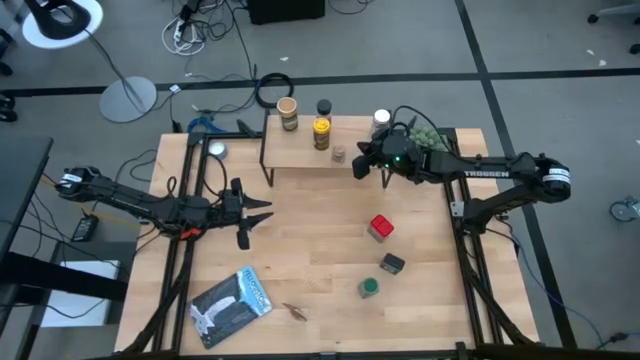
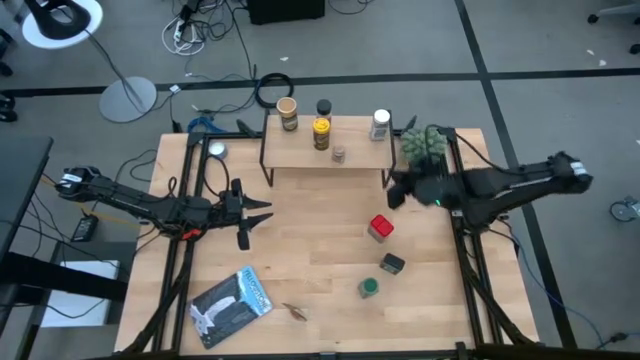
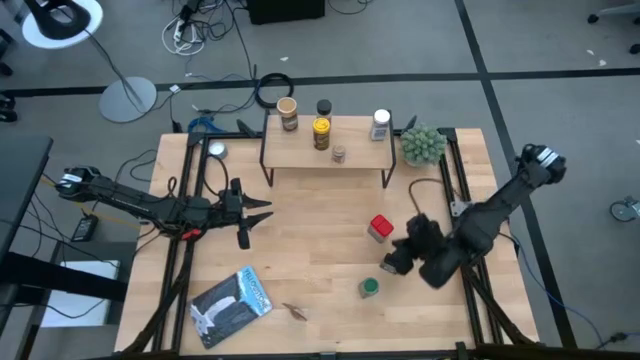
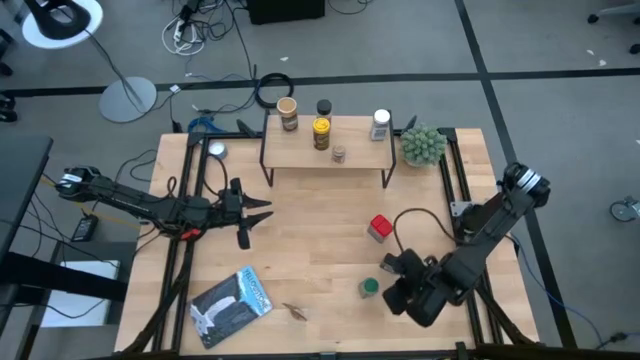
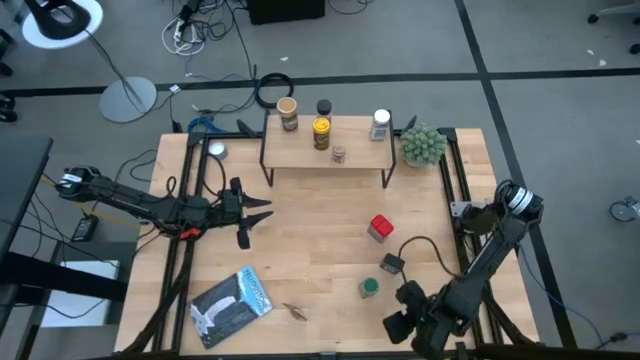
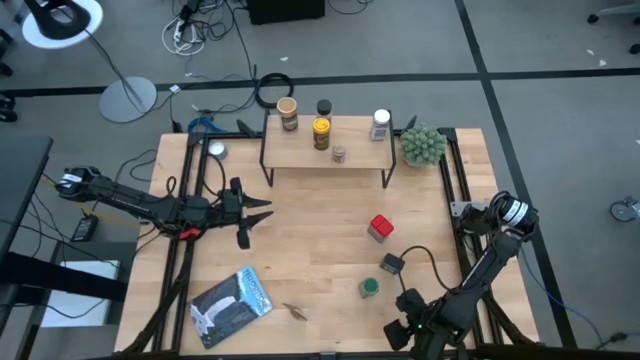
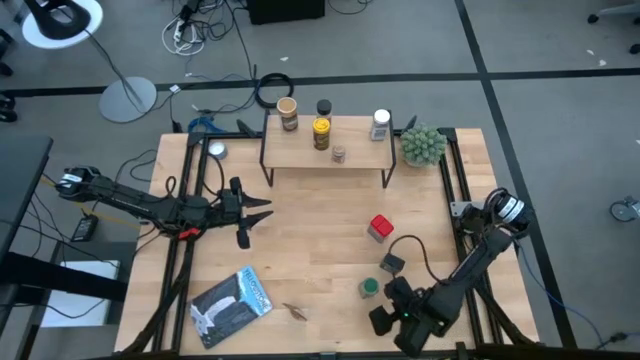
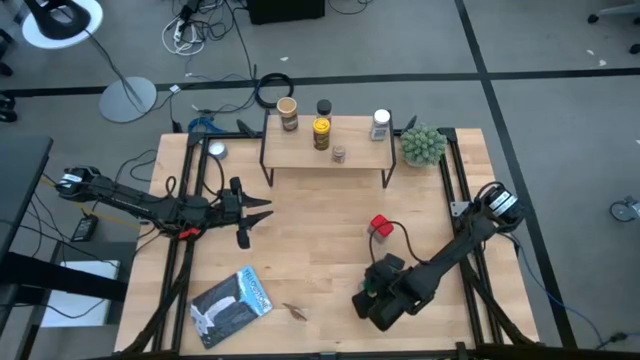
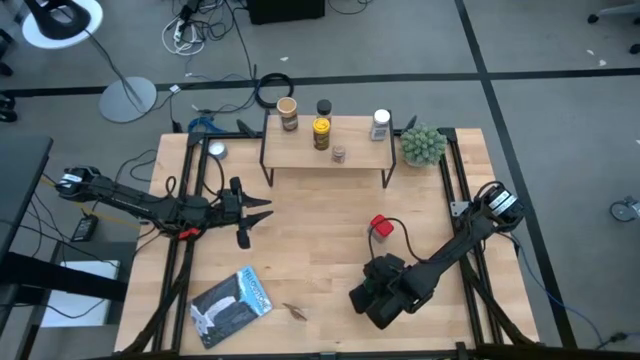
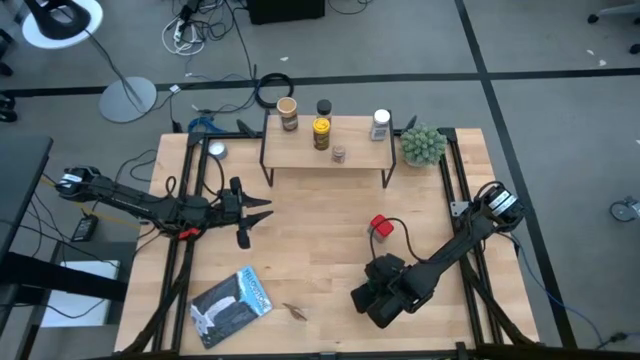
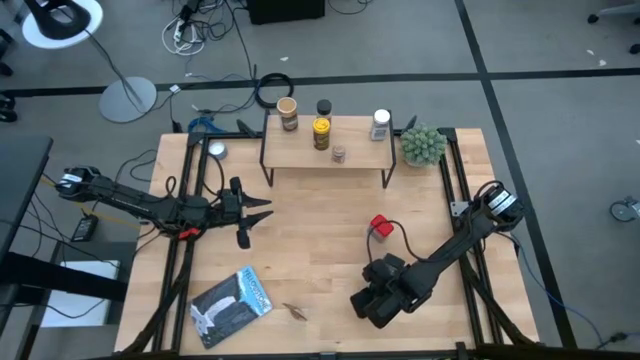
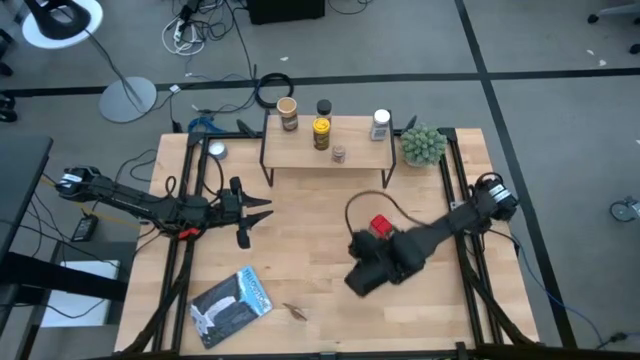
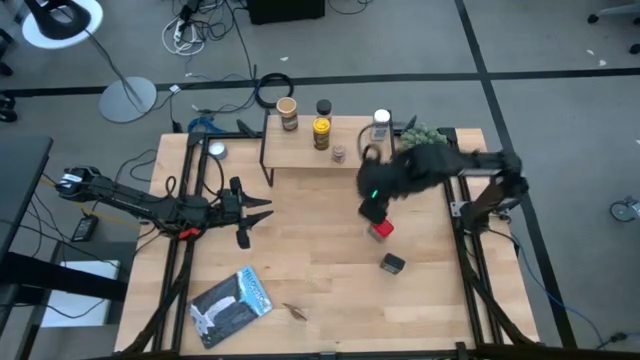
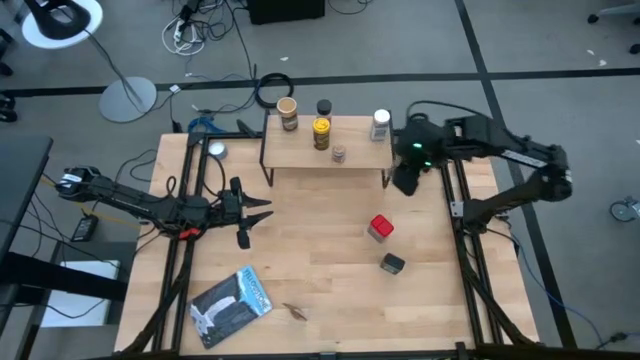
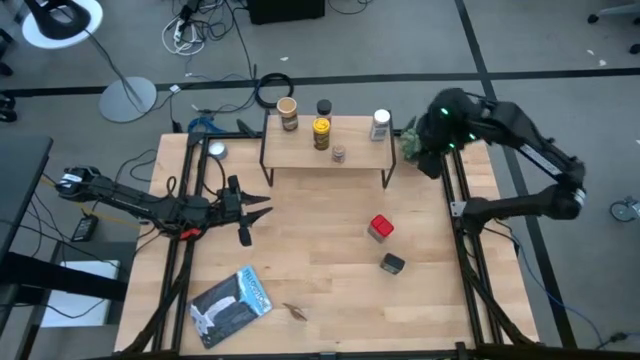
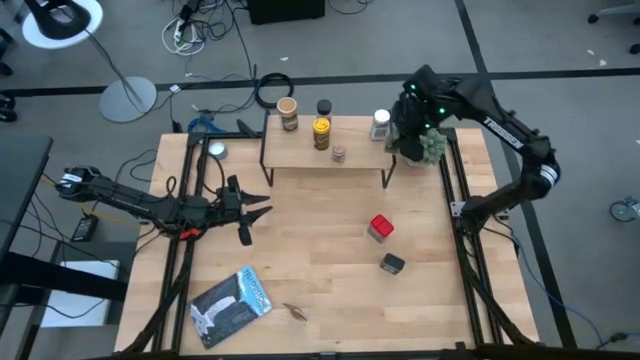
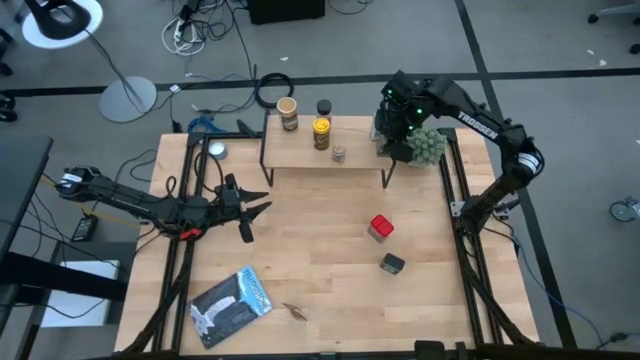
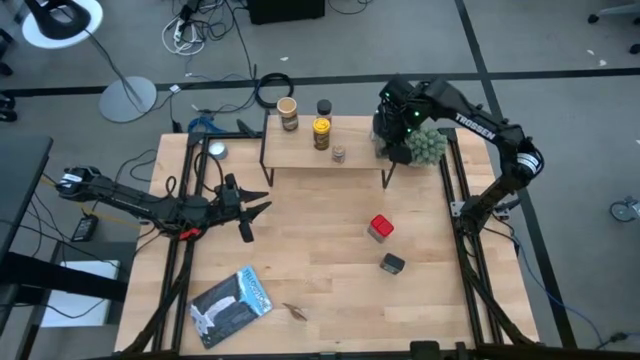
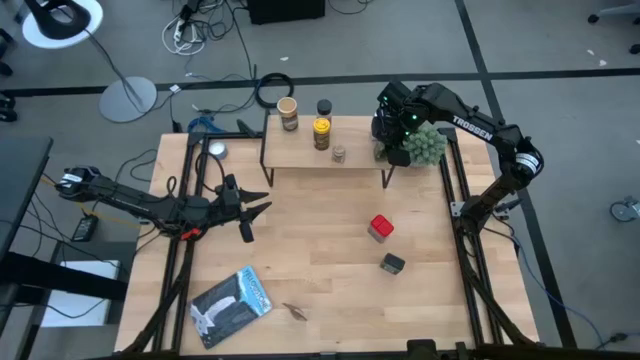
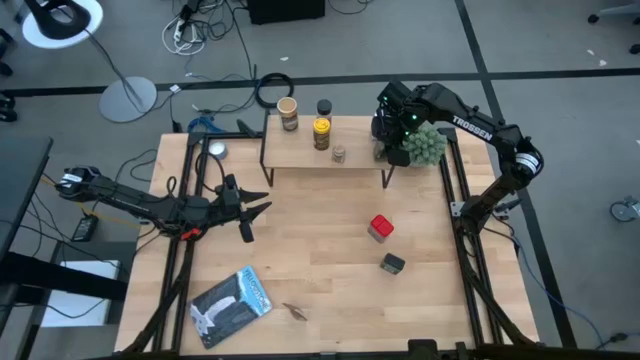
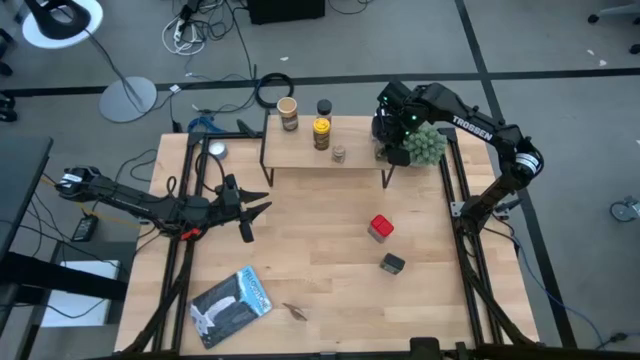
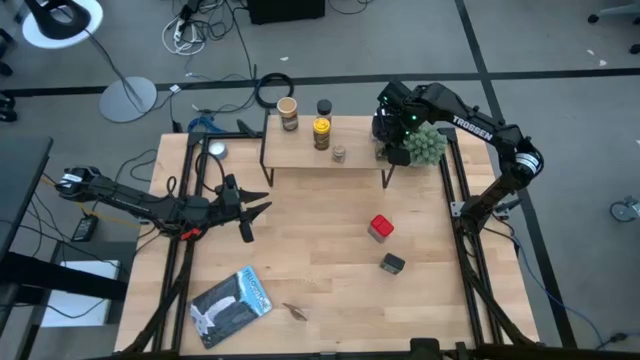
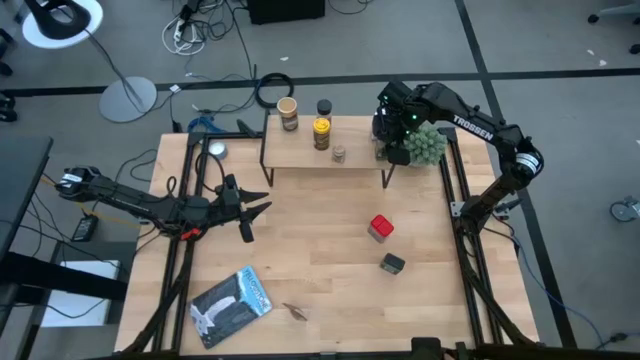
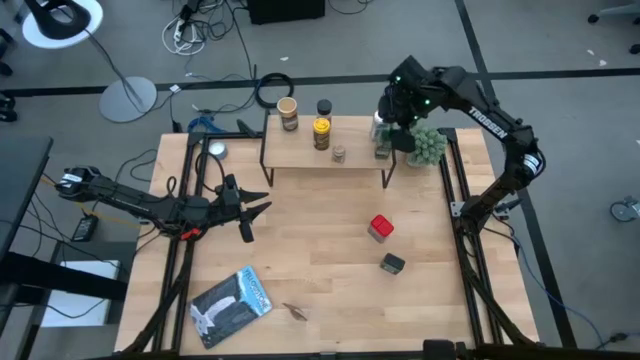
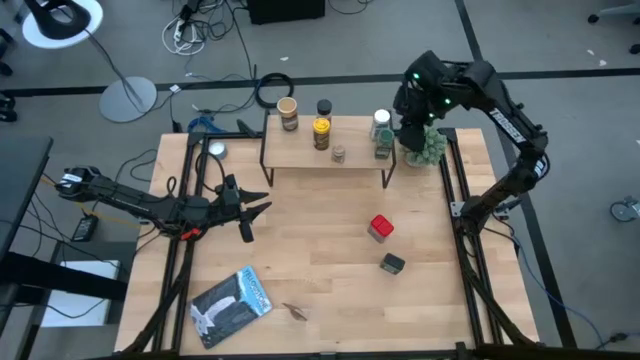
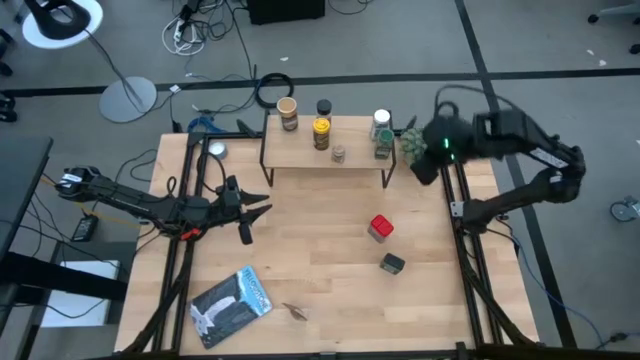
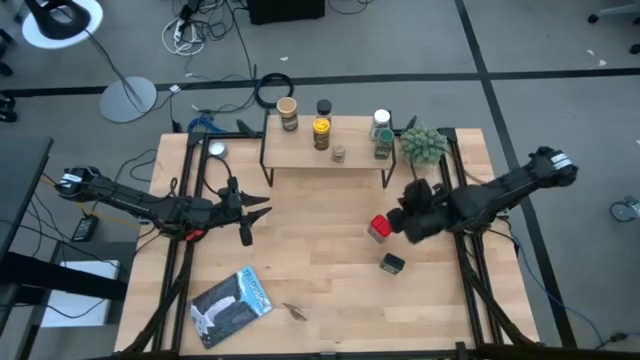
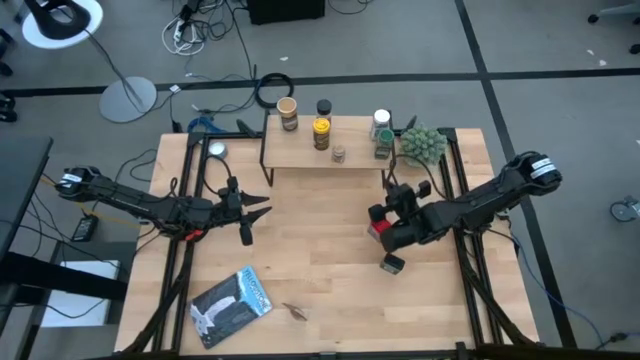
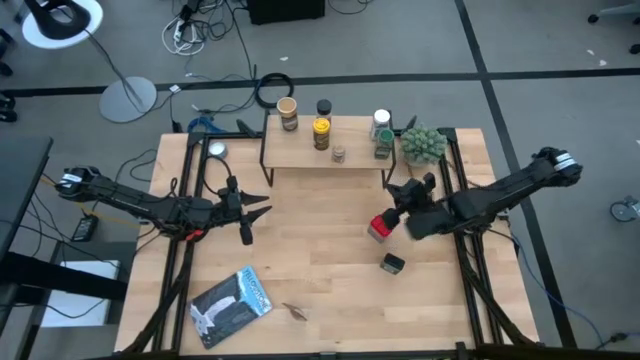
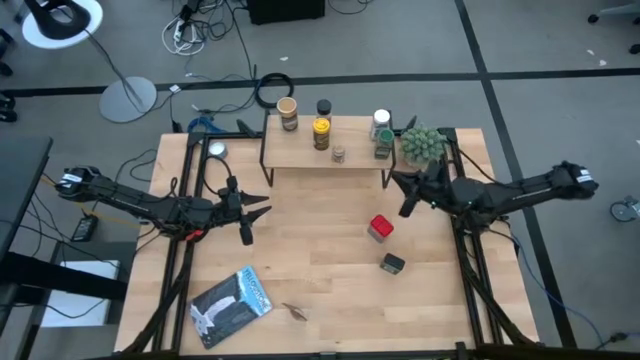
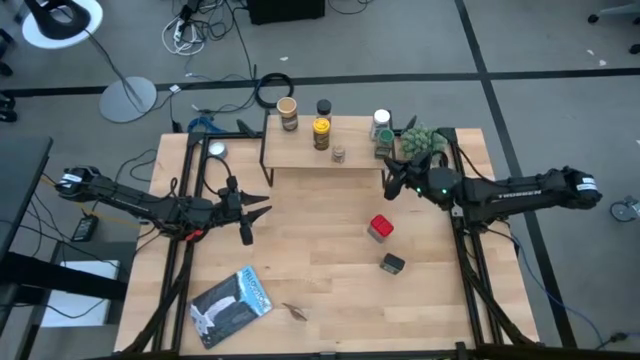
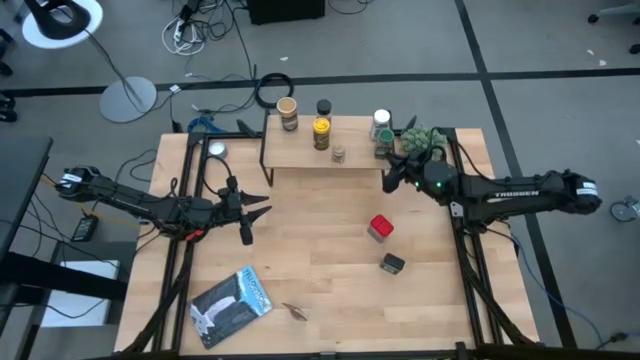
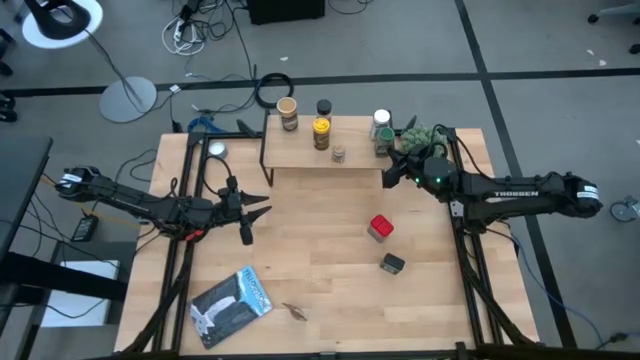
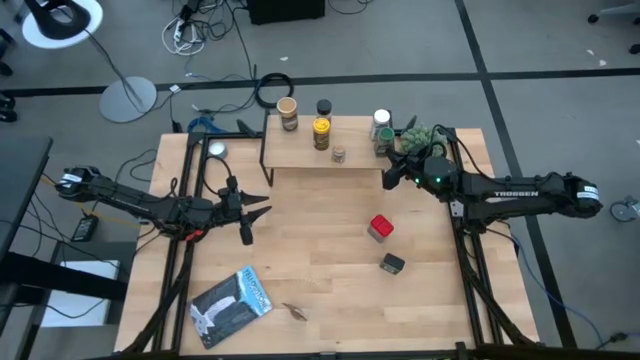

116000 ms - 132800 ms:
Task: Shelf spices
Put the green seasoning bottle on the shelf aligned with the other white seasoning bottle

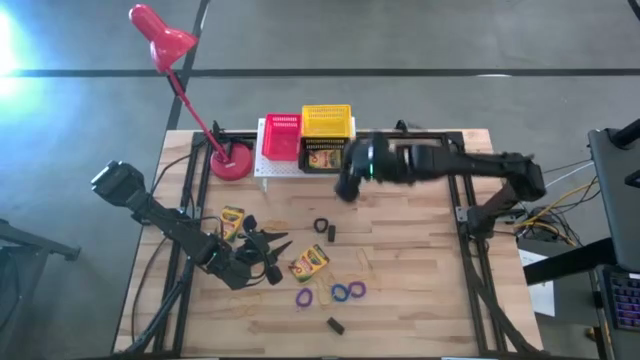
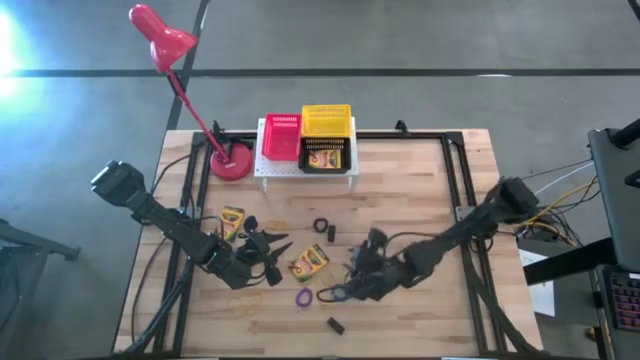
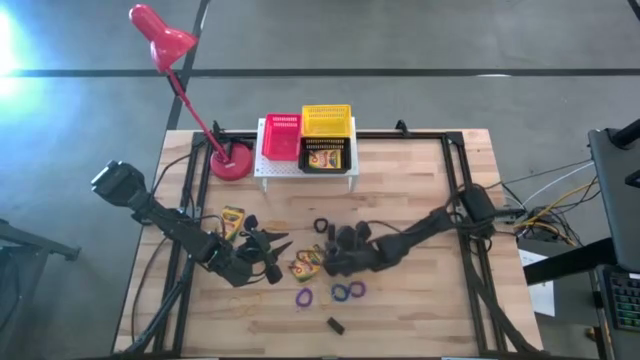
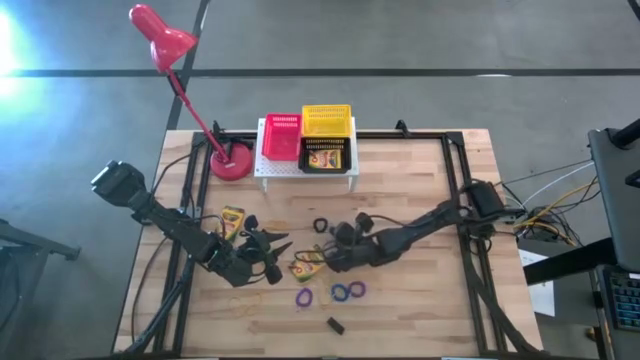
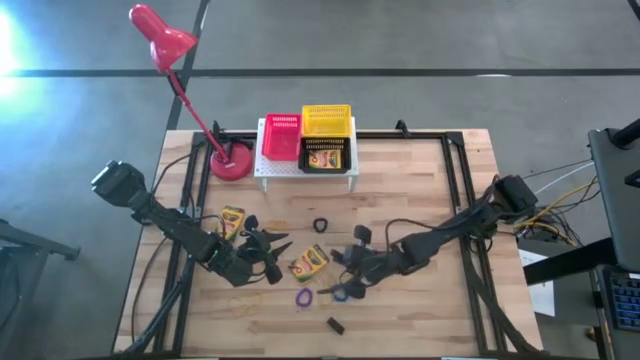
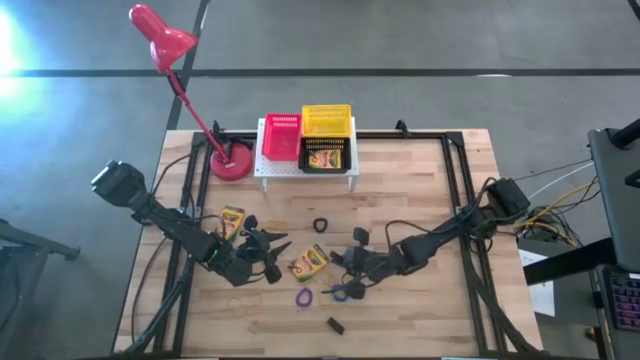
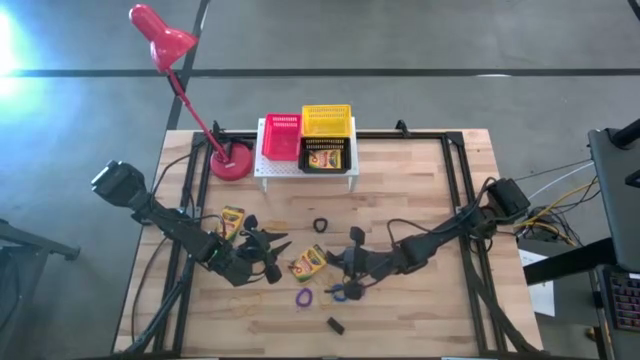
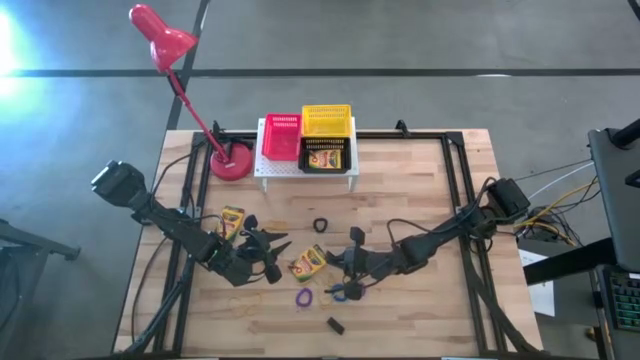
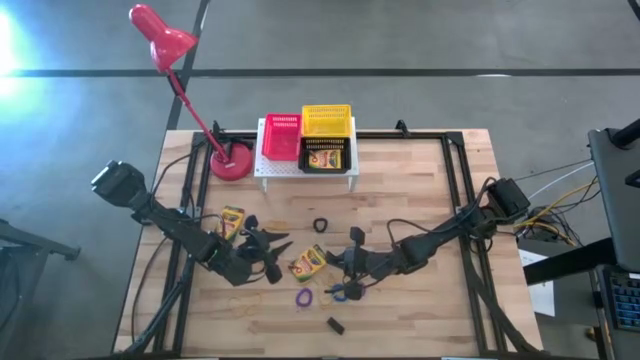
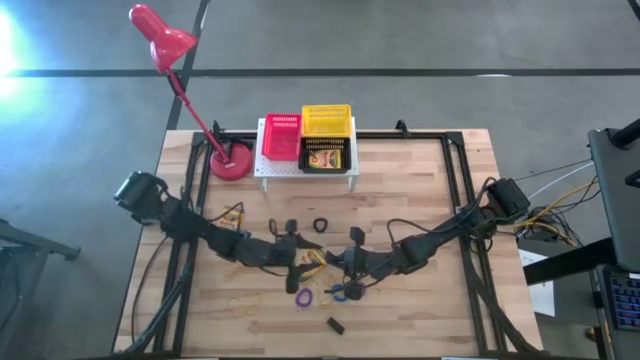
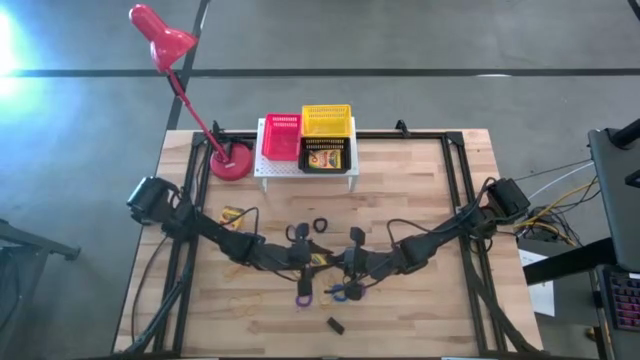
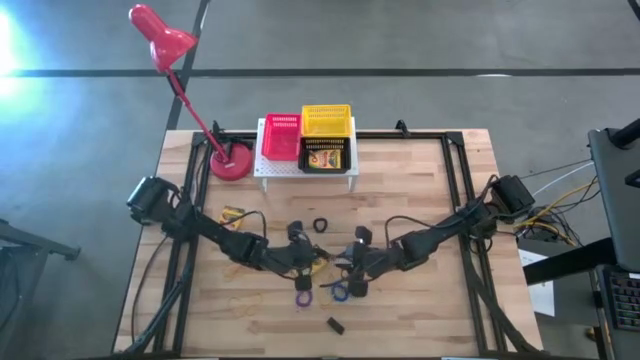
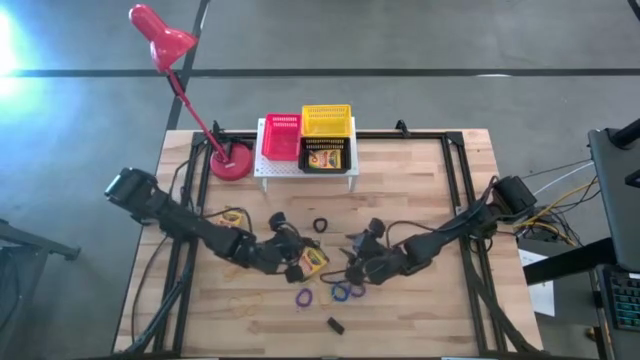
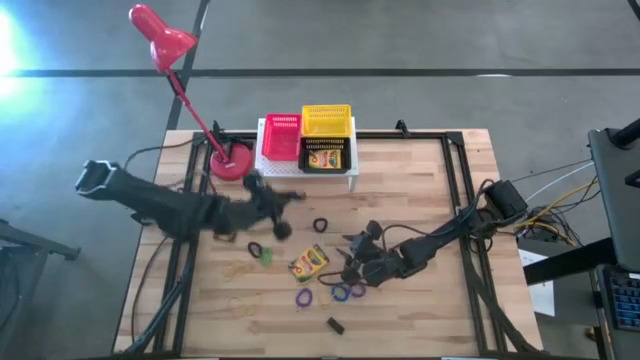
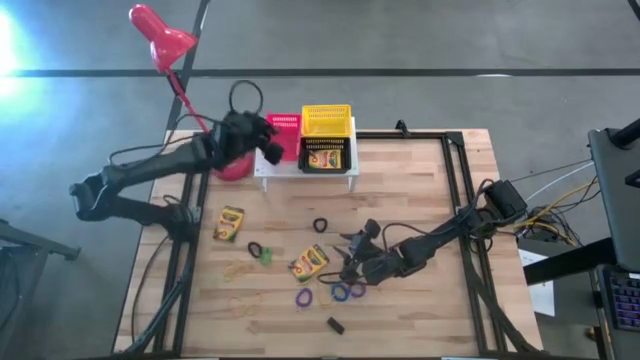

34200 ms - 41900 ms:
Task: Pick & Place Office Desk Supplies
Put the top black rubber band into the red bin on the shelf
